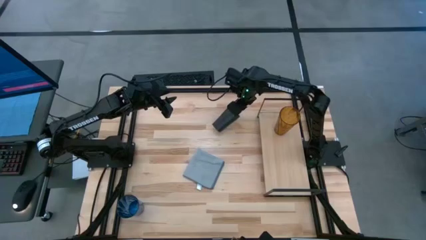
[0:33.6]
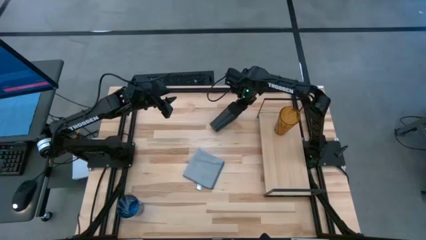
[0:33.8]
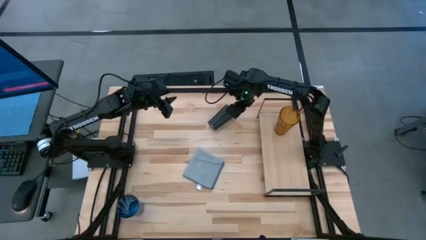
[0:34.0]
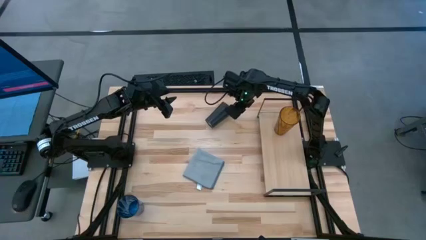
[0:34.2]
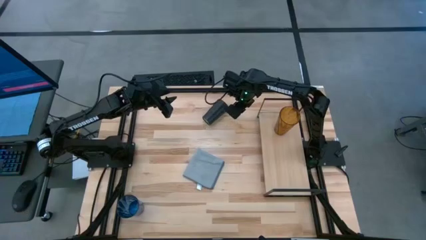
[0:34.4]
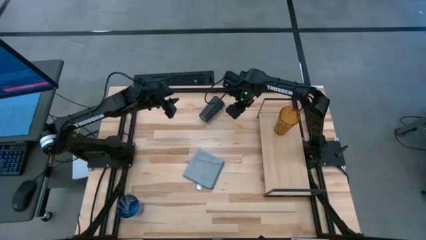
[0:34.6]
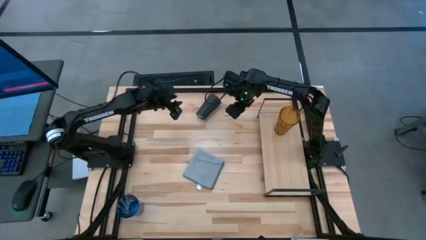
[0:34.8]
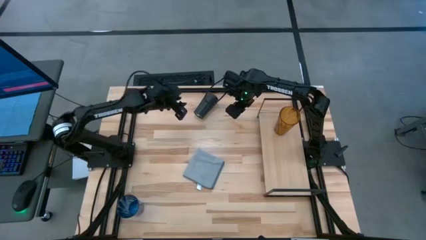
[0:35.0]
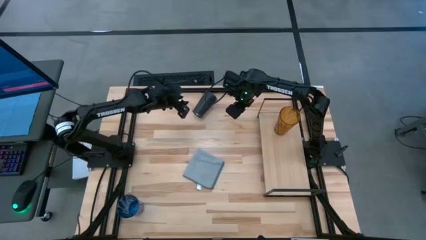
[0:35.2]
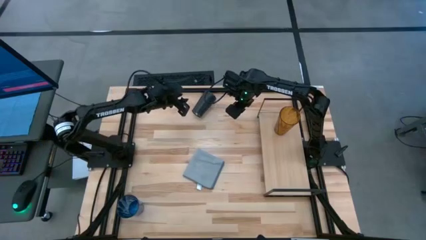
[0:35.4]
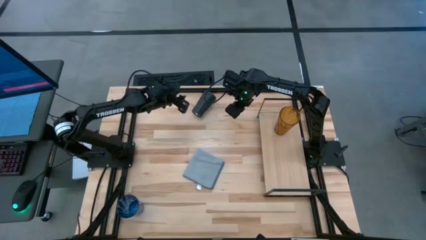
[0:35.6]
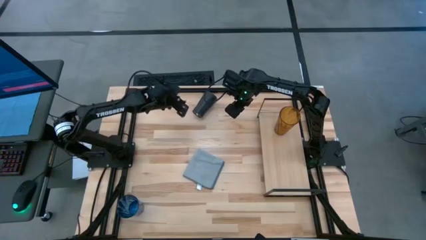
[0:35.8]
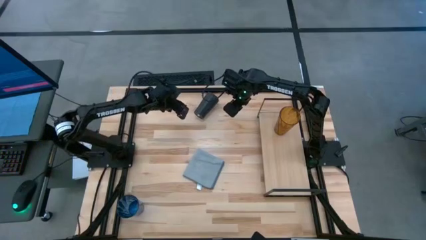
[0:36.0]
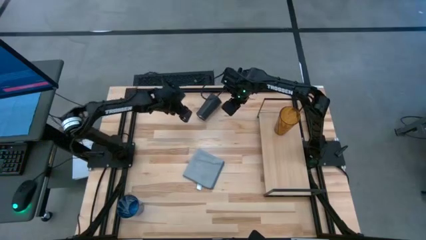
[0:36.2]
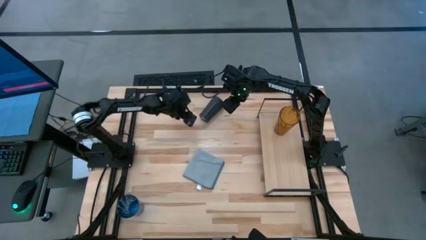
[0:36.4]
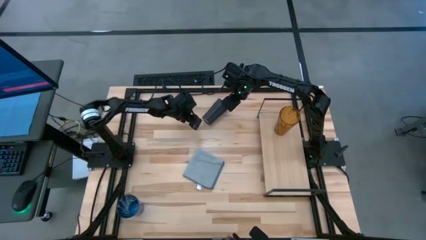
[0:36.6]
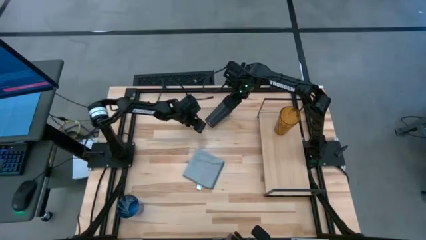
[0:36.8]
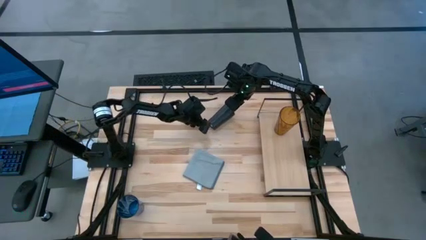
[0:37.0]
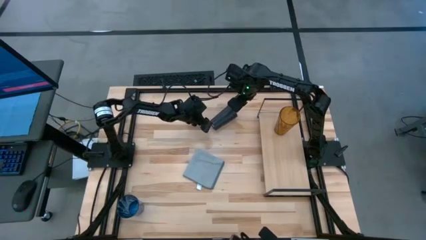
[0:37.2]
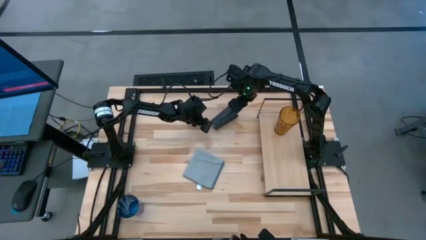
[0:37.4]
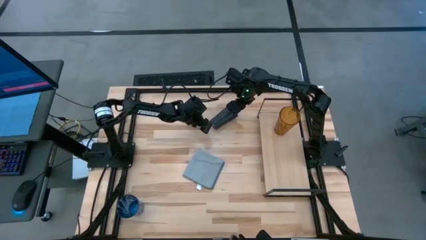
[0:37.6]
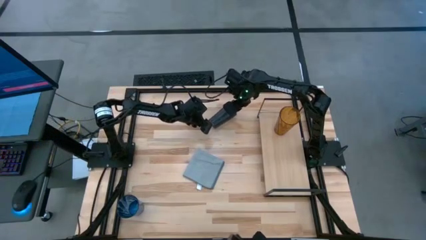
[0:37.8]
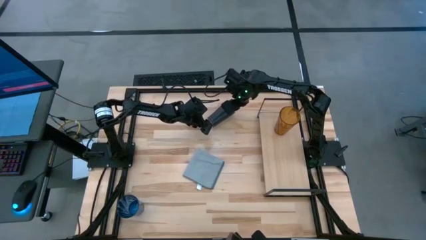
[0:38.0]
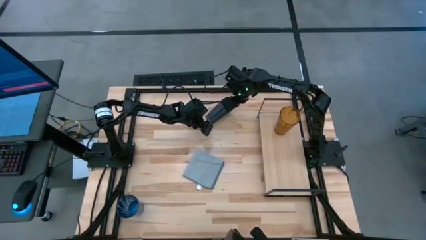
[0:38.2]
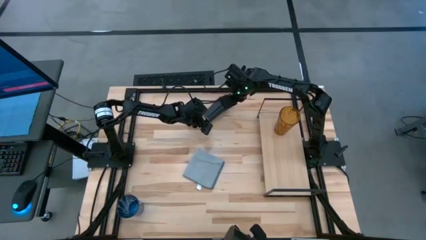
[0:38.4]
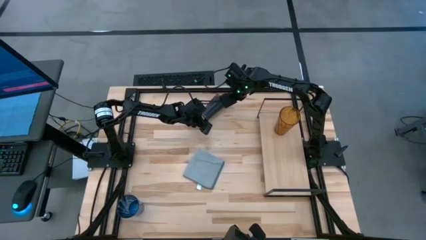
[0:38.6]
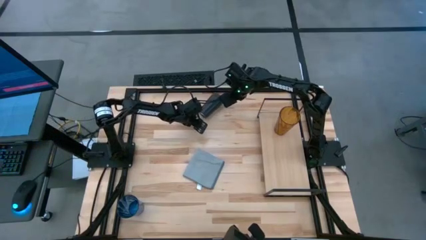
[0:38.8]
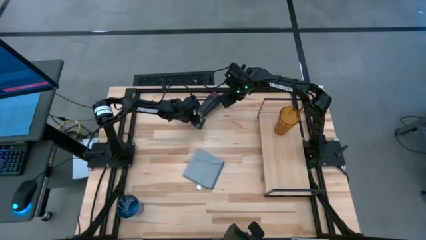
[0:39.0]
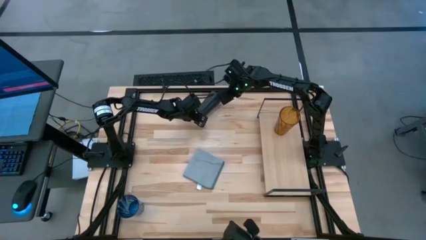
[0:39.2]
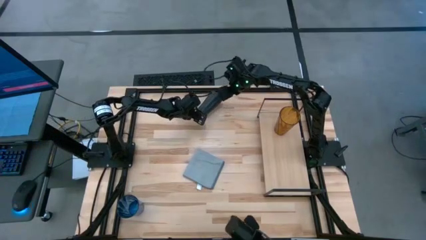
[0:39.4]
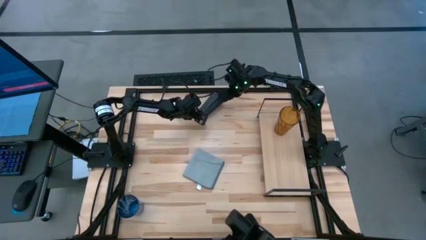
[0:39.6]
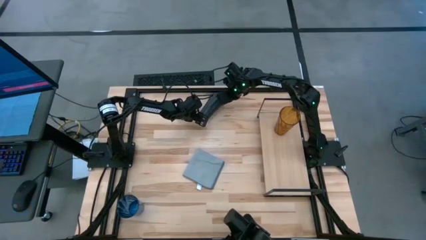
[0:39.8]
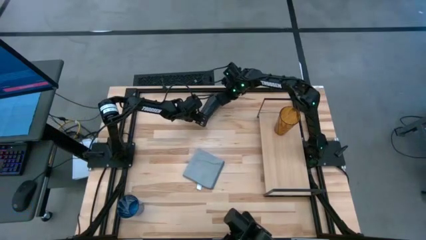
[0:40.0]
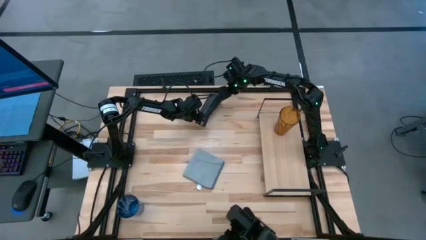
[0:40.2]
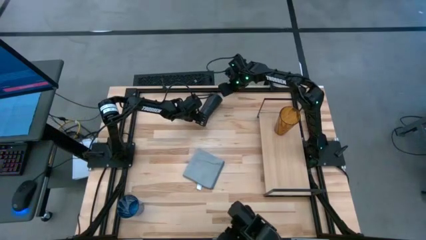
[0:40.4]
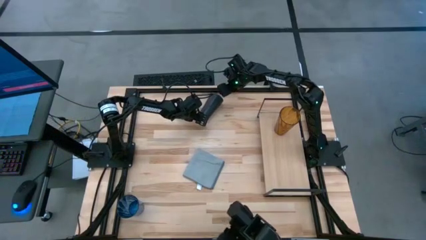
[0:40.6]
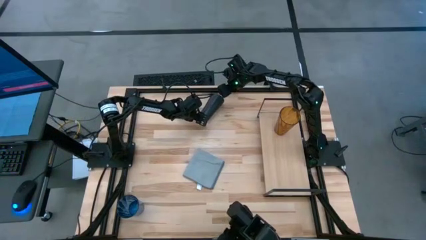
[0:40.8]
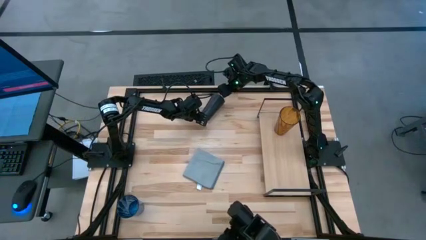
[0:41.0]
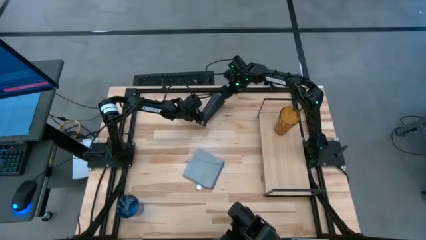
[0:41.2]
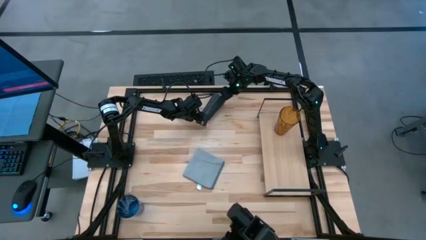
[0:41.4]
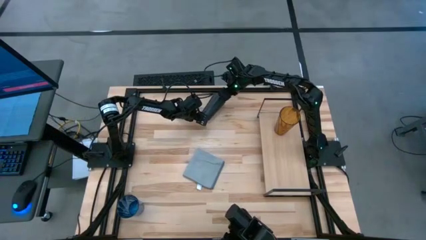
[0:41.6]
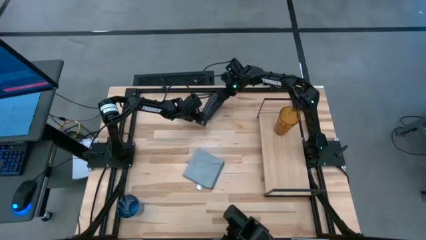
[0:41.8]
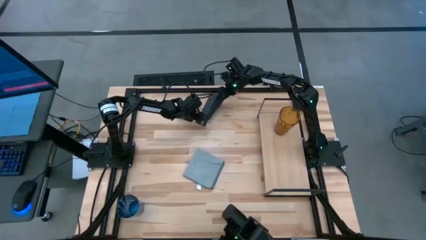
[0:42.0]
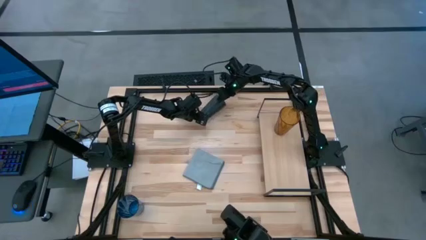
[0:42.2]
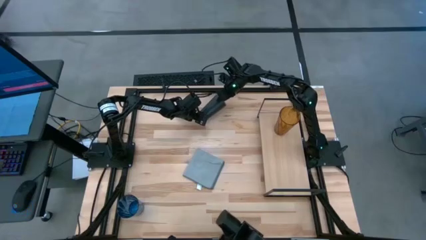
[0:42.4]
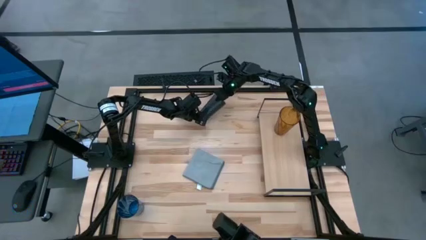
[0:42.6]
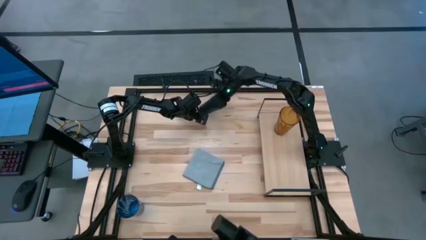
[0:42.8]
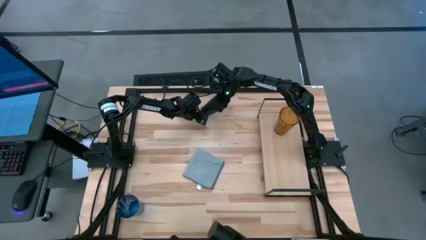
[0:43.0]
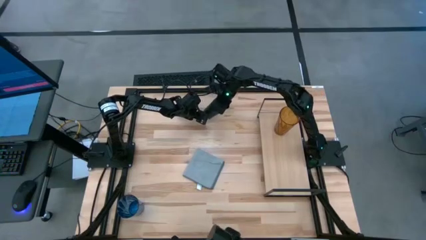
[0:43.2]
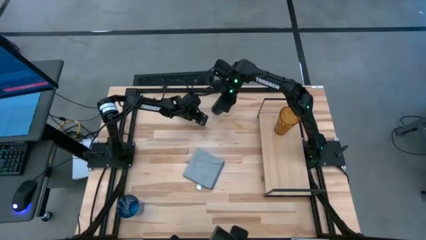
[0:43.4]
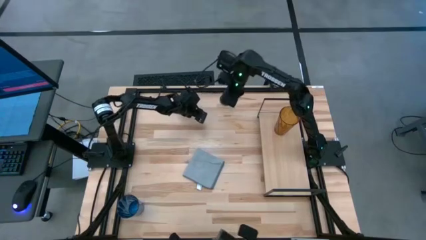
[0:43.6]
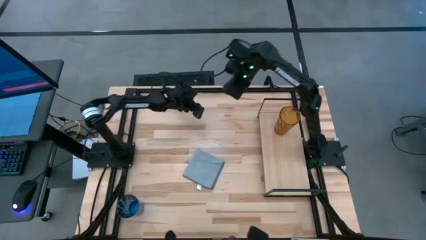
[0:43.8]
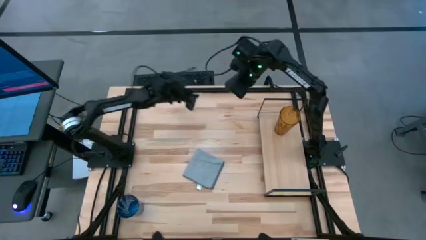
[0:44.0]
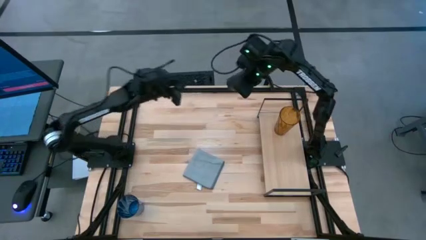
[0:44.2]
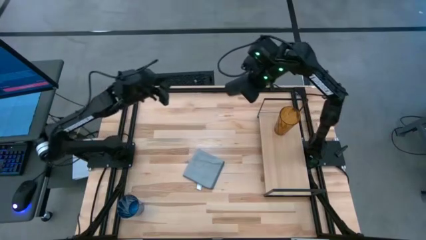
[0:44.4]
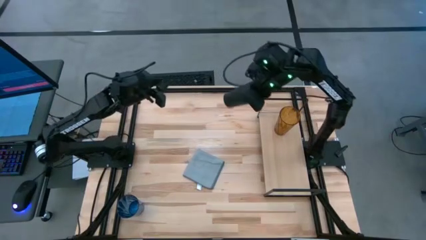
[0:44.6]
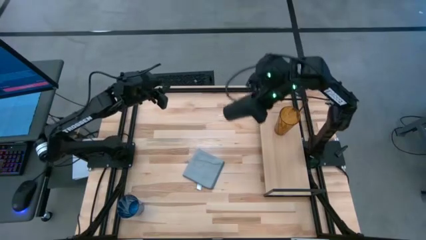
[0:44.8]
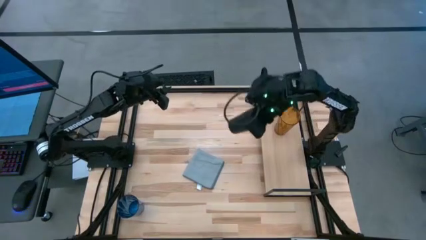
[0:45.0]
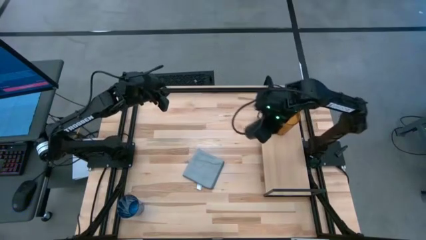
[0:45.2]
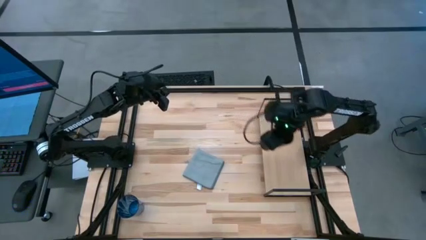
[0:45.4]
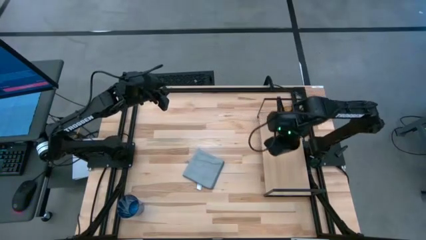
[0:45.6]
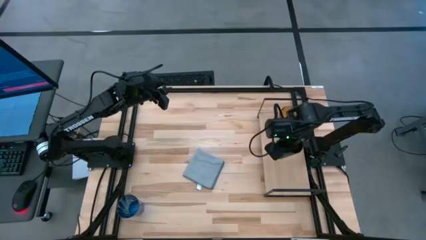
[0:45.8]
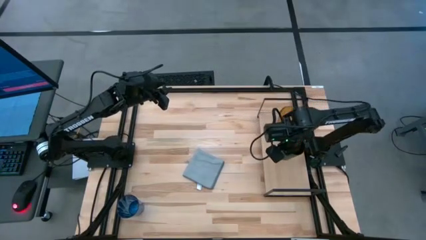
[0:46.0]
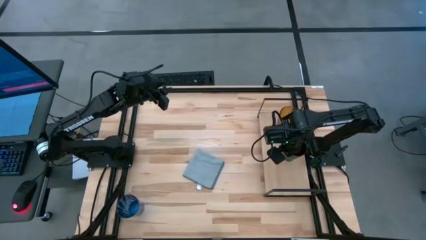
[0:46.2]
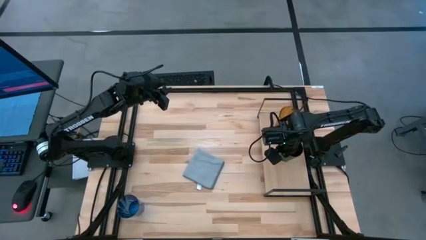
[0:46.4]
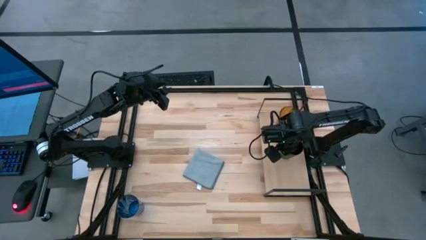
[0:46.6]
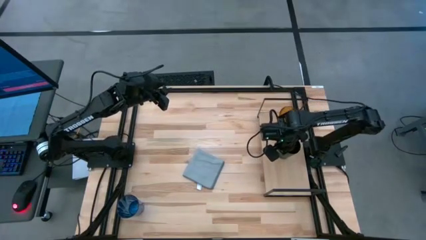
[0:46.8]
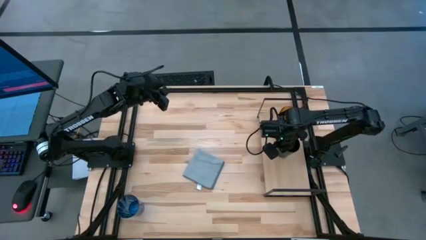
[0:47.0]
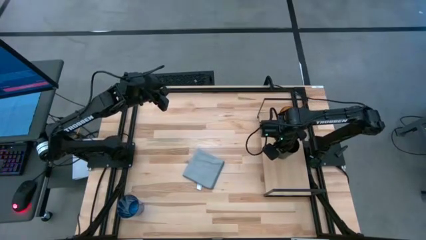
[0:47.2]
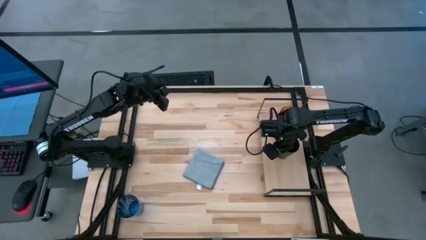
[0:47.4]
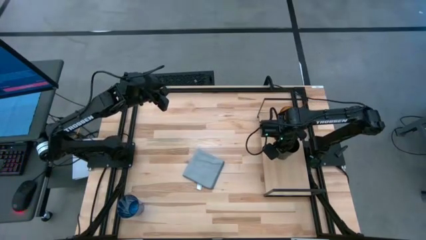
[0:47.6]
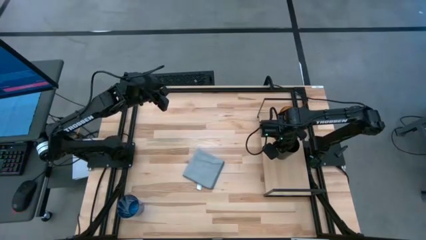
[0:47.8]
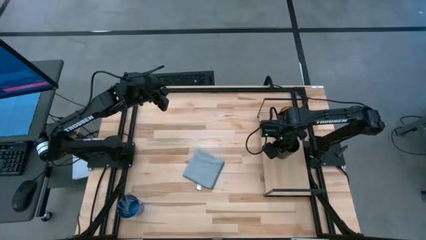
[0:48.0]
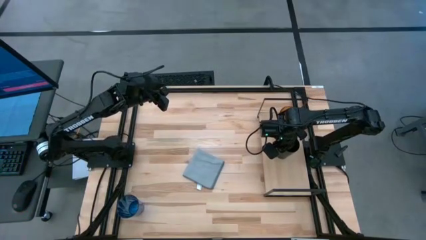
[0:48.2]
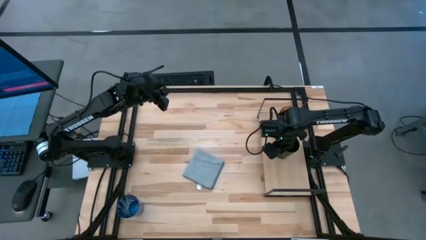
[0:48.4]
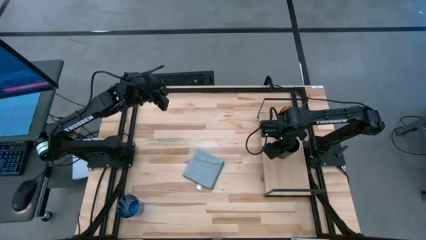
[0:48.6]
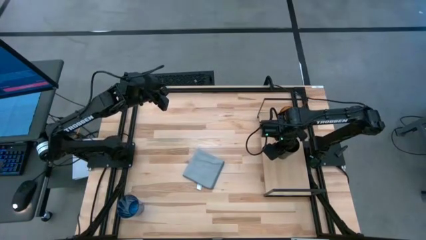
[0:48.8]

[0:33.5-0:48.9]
Task: Stack small to large cups/mugs on shelf
Put the black cup on the shelf
